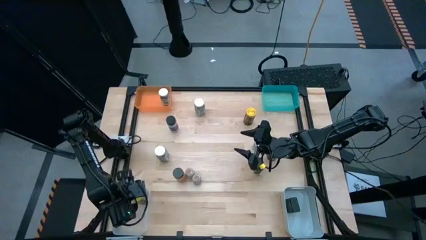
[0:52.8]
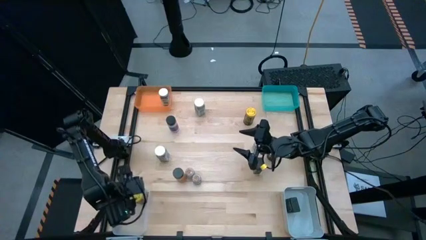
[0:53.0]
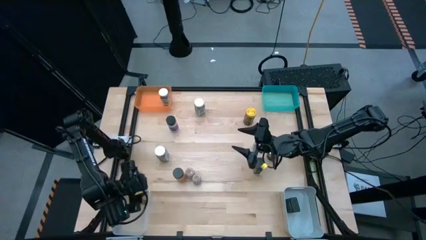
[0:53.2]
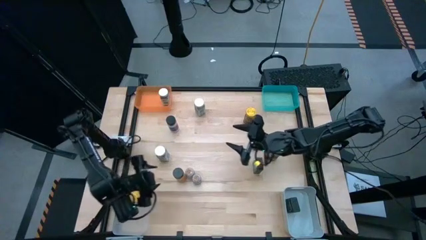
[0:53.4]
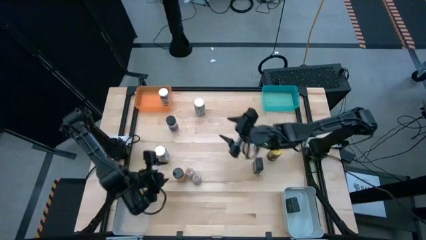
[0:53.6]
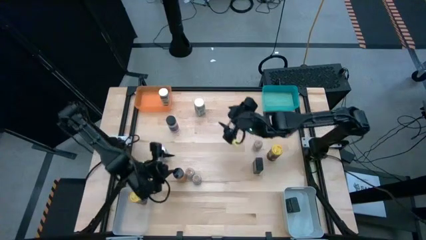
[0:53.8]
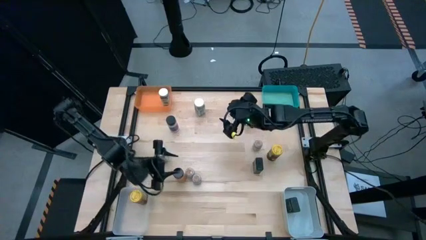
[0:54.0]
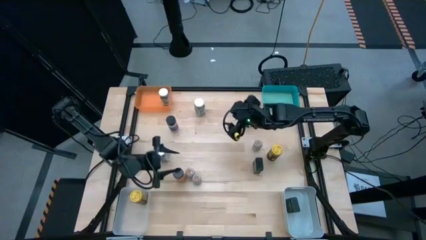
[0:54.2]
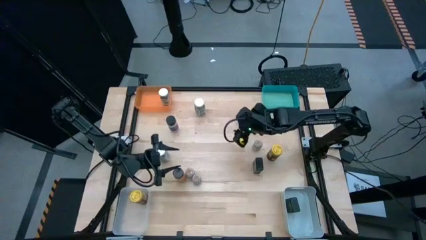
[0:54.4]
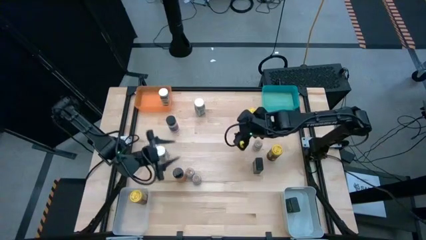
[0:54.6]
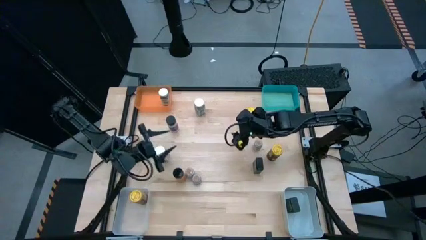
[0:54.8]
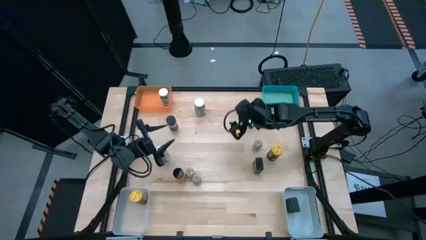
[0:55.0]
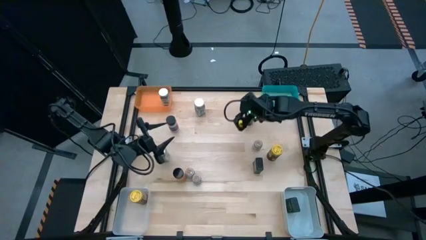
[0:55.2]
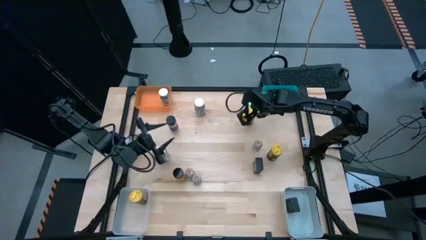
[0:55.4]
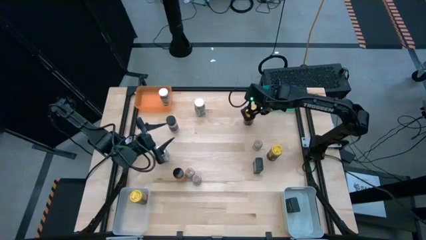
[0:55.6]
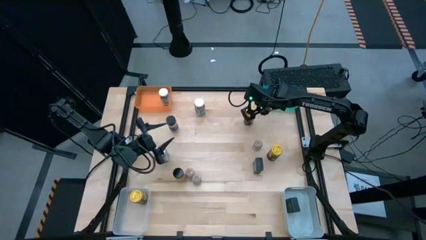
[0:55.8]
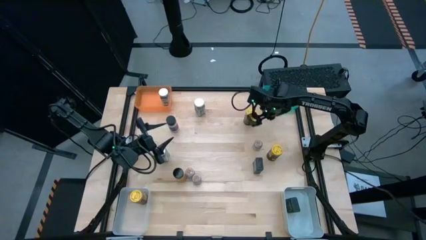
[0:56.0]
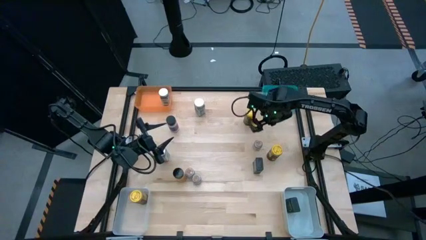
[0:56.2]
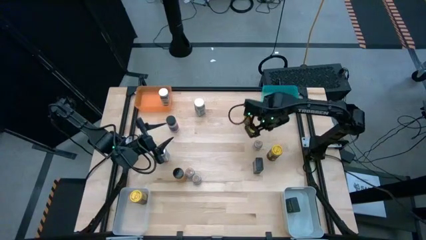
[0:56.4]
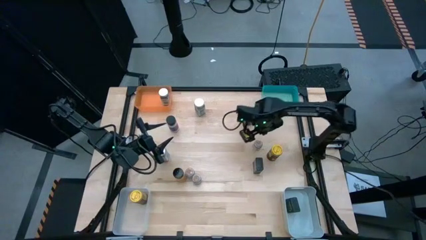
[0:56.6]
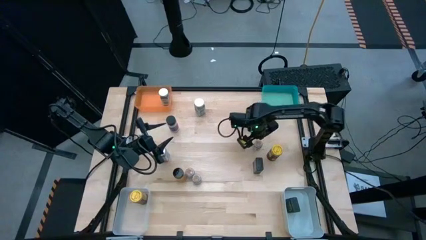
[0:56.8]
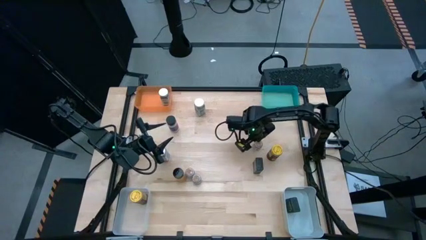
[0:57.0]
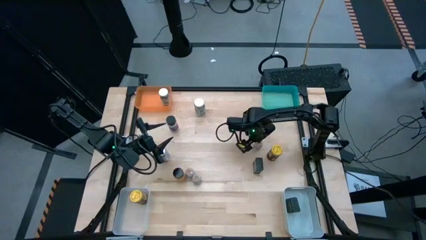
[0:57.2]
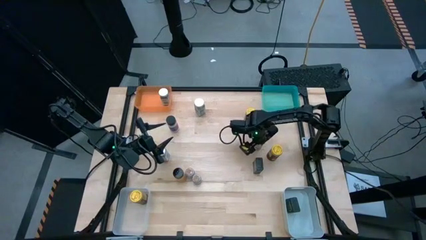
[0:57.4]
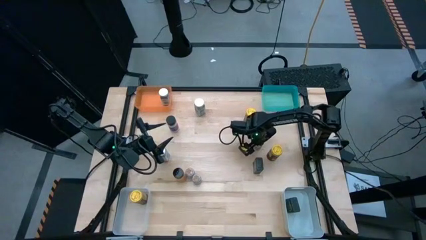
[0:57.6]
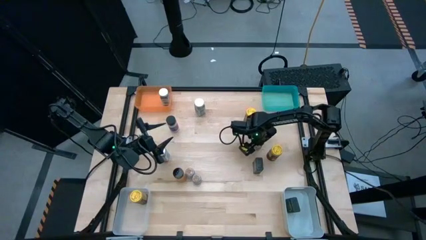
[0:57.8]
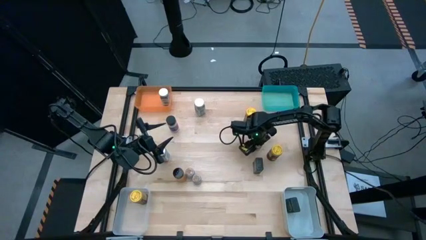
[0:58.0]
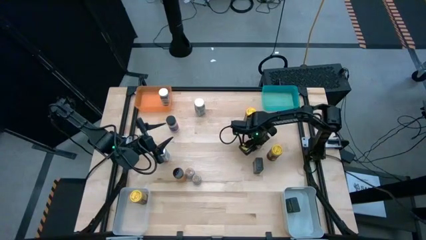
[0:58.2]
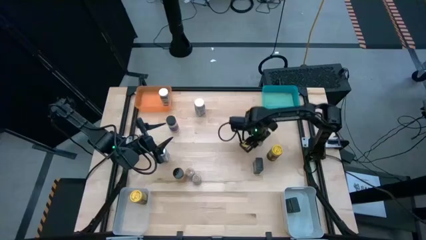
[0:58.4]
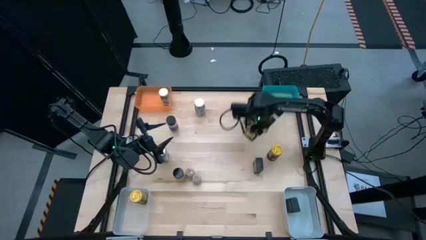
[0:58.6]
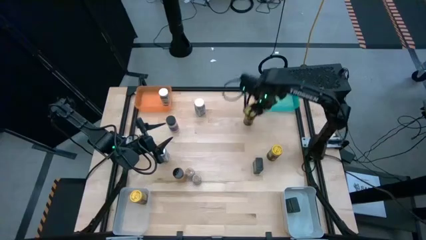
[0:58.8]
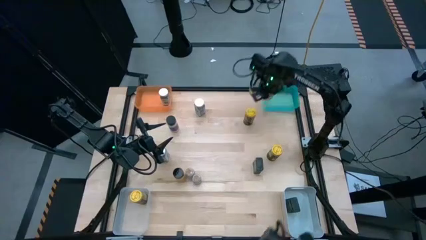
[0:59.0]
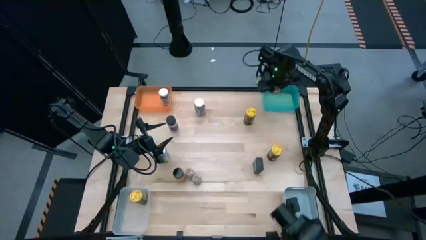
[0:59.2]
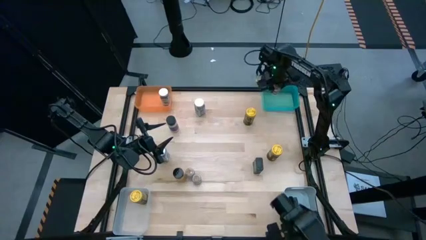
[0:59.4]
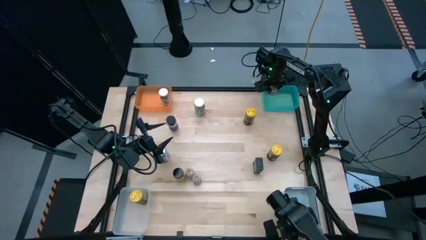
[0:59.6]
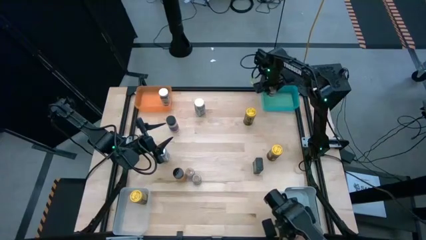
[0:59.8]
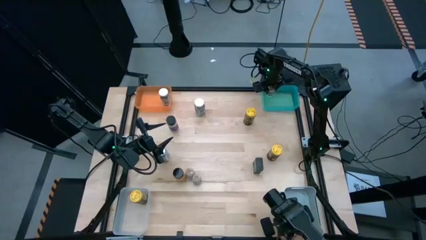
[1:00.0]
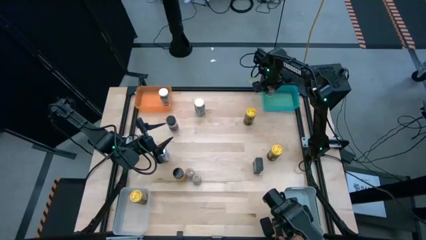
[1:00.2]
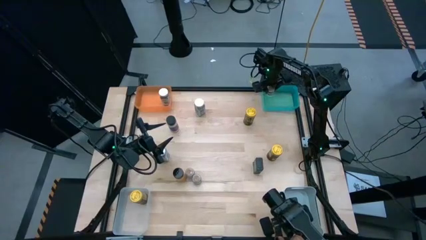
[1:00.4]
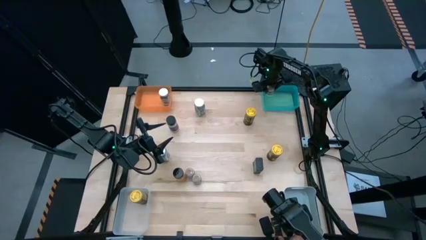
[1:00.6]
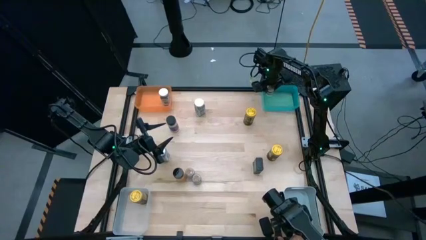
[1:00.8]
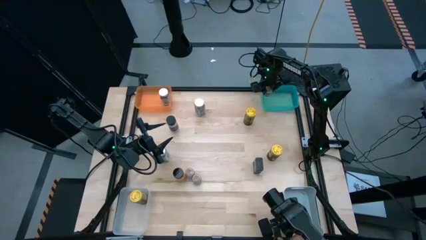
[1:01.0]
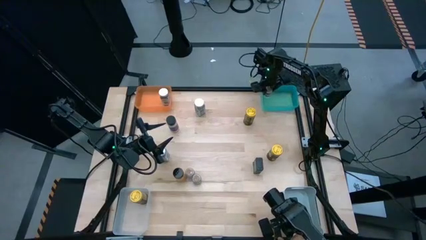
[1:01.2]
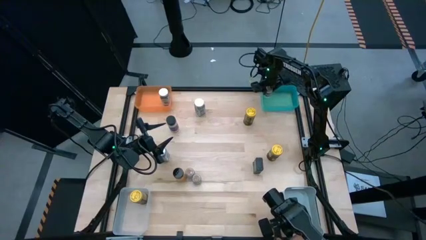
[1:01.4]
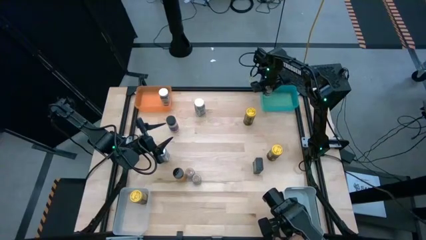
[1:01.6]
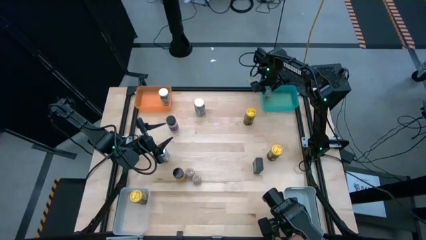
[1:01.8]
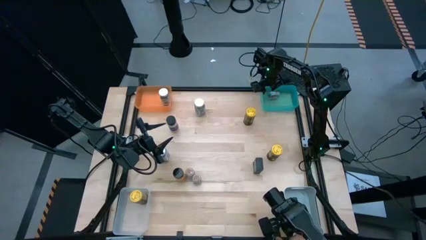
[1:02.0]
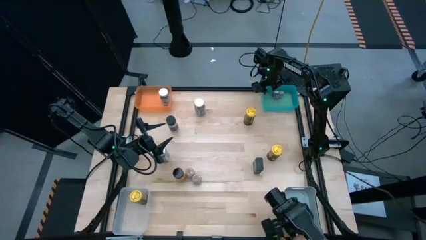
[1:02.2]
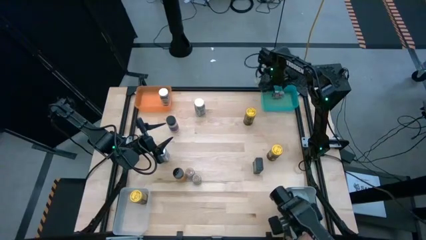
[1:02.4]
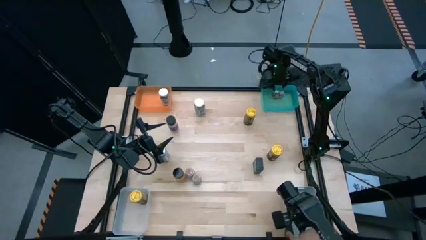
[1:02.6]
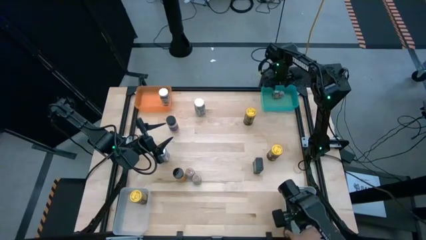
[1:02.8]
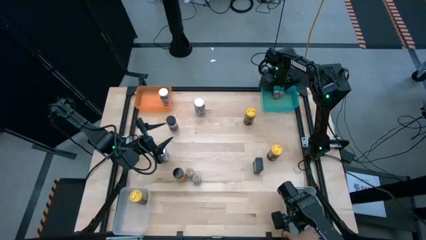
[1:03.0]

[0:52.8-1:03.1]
Task: Sort spices by type
Put the top brown seasoning bottle into the blue bin

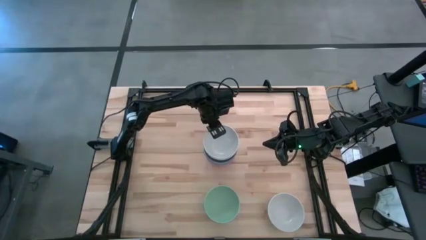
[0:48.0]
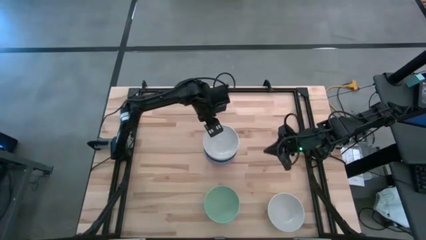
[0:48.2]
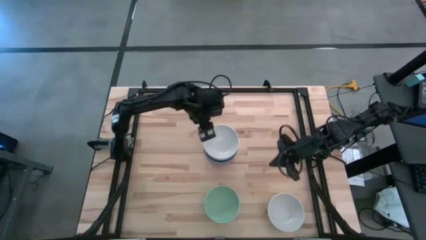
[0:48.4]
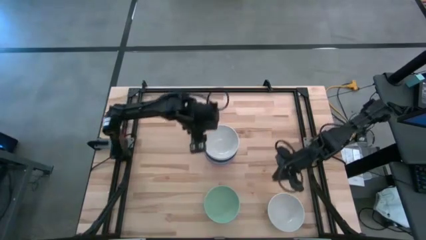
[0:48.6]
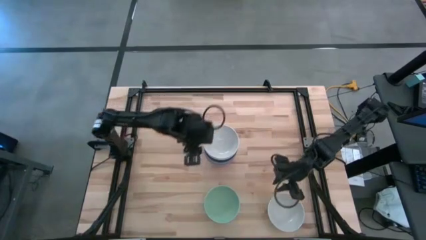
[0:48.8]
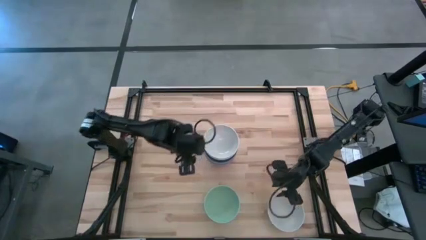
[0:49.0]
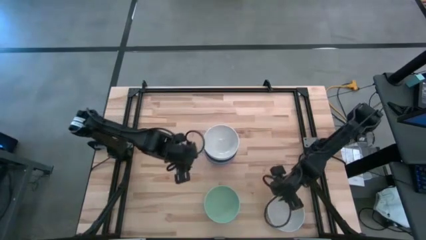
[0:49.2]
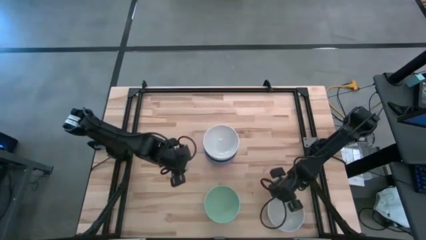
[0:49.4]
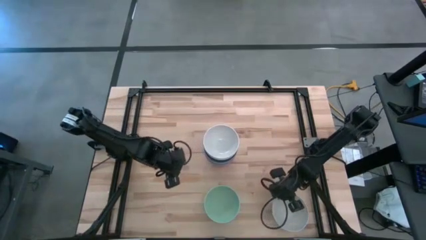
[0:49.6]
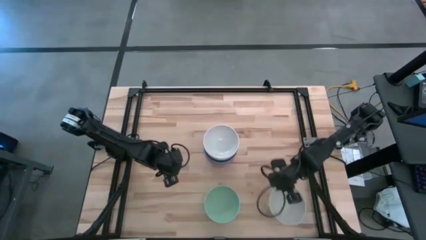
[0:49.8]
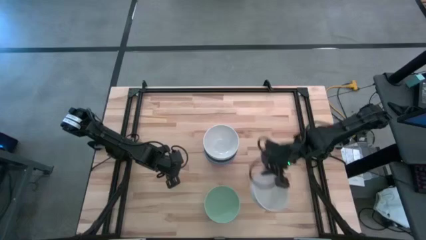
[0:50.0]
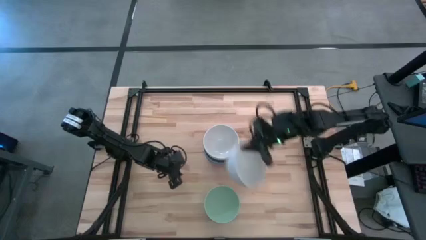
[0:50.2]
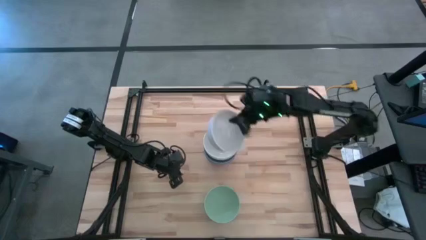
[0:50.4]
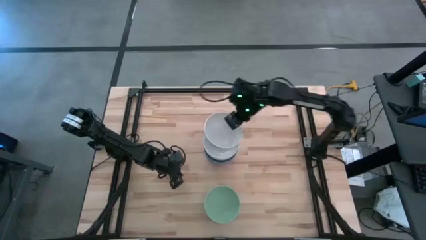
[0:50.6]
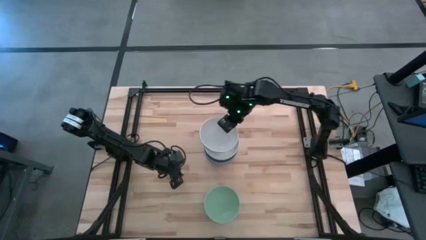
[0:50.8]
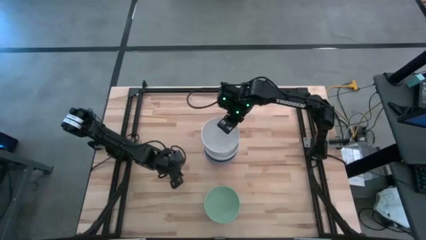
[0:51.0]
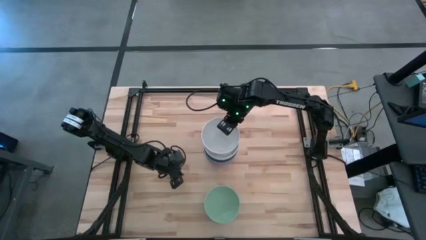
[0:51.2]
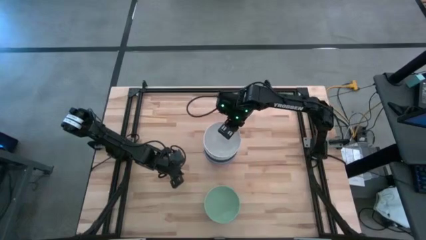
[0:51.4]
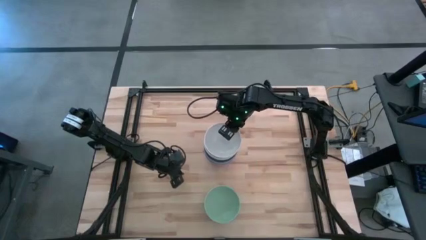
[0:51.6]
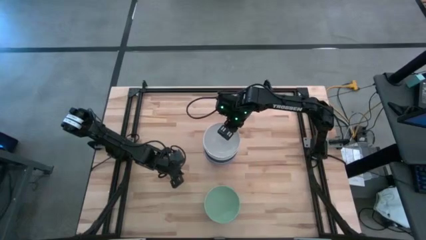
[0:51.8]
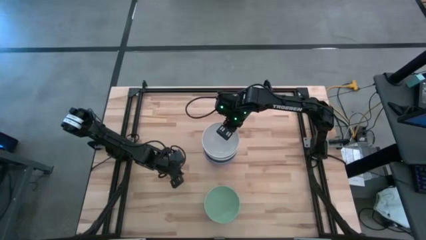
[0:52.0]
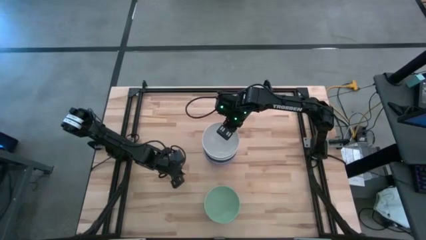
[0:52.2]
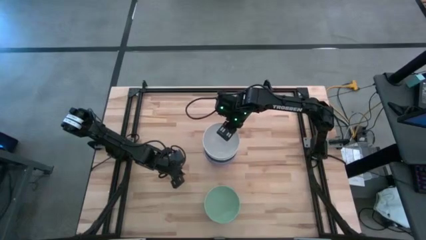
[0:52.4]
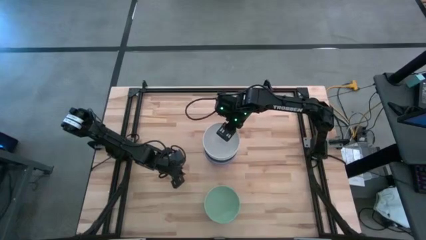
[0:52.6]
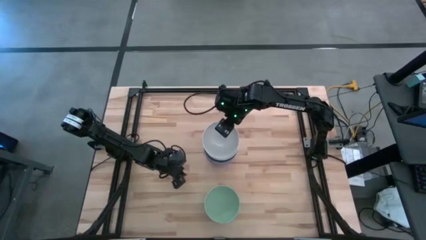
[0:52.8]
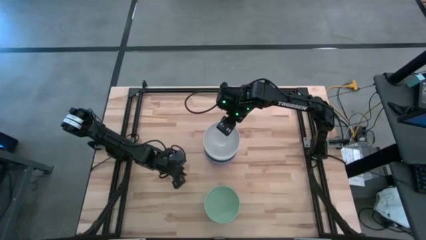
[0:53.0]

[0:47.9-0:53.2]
Task: Nest bowls inside each other
Stack the white bowl into the white bowl

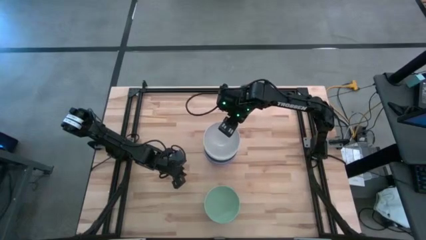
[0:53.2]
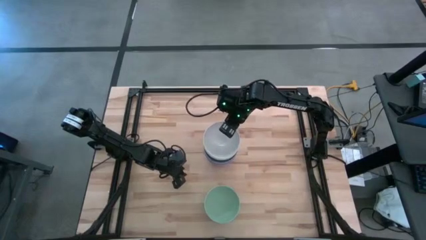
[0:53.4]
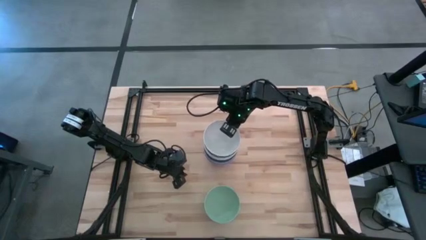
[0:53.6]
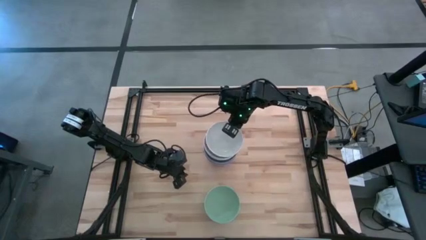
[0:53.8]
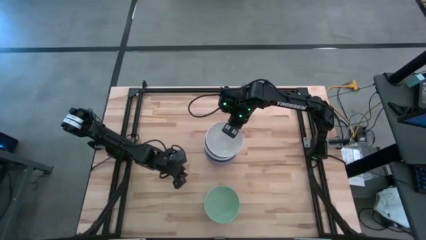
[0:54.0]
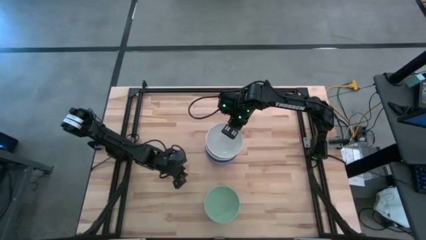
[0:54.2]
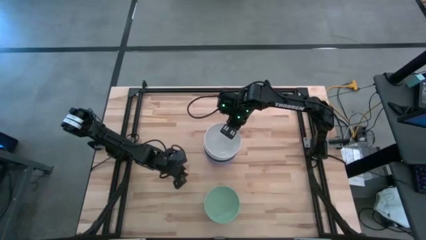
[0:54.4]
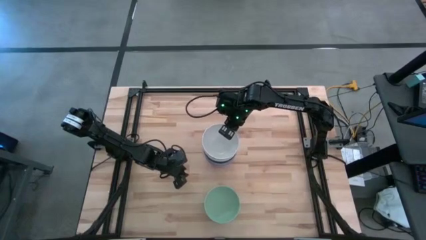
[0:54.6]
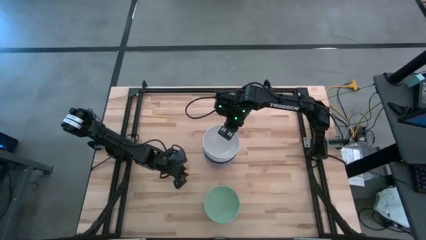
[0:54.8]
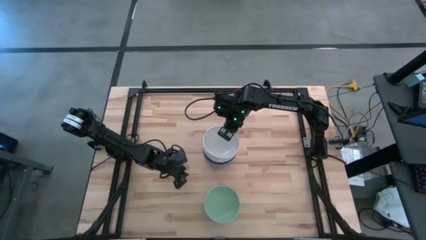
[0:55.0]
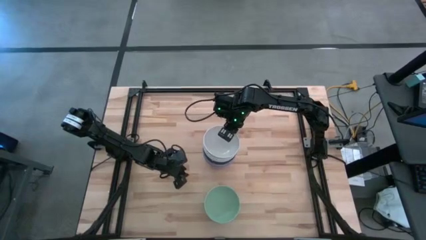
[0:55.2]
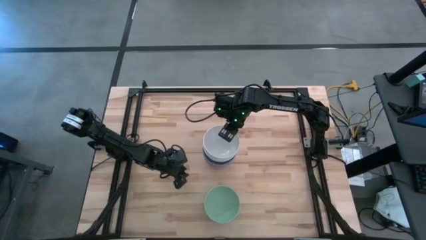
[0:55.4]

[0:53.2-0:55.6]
Stack the white bowl into the white bowl
